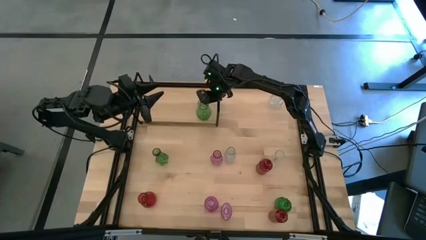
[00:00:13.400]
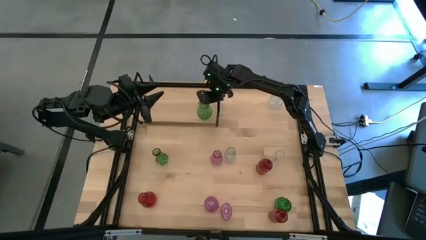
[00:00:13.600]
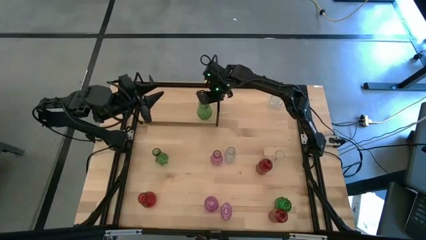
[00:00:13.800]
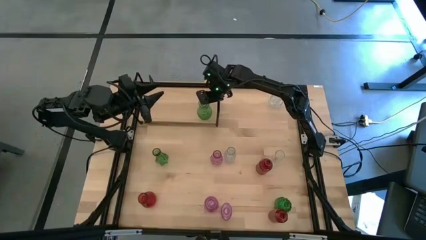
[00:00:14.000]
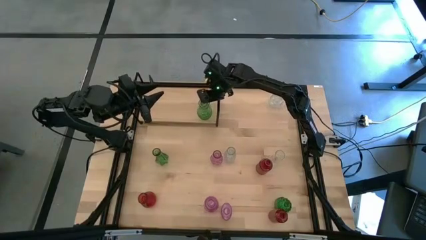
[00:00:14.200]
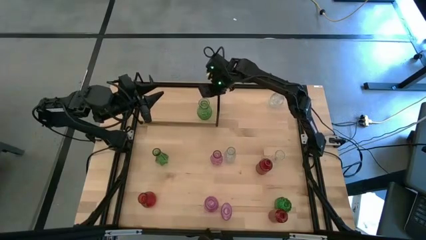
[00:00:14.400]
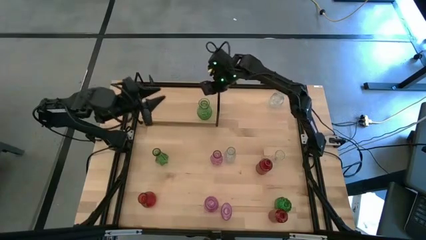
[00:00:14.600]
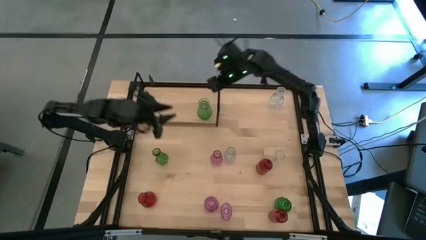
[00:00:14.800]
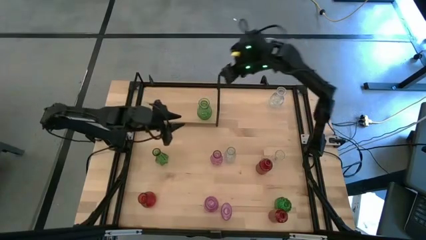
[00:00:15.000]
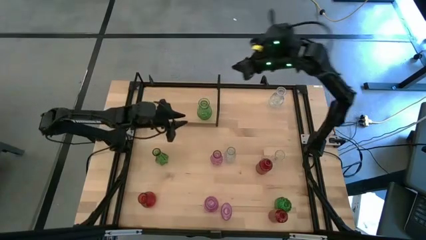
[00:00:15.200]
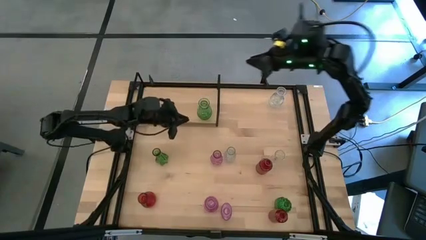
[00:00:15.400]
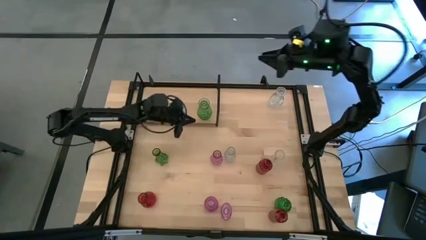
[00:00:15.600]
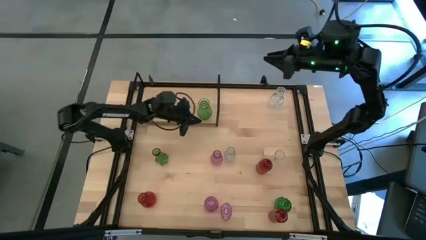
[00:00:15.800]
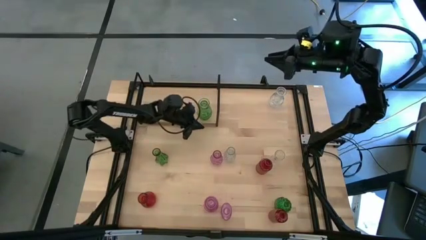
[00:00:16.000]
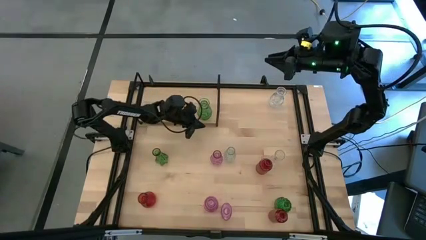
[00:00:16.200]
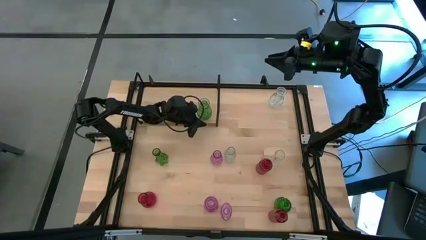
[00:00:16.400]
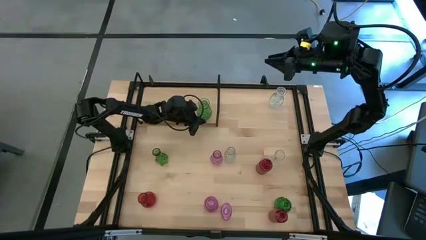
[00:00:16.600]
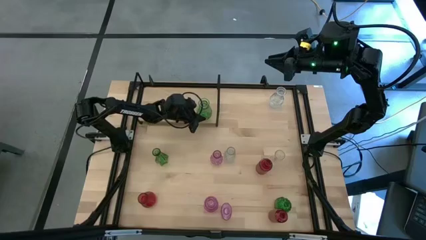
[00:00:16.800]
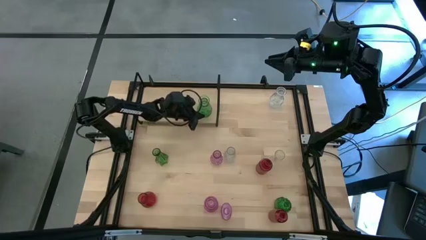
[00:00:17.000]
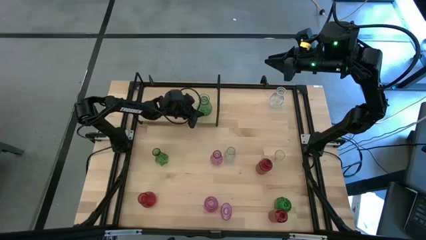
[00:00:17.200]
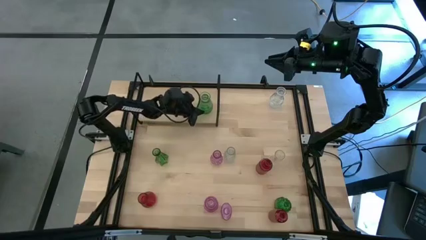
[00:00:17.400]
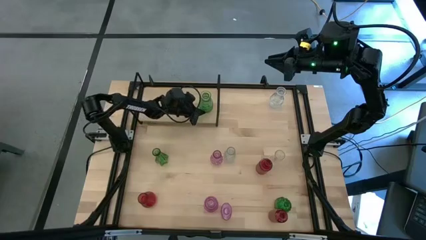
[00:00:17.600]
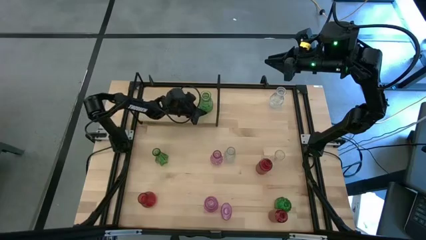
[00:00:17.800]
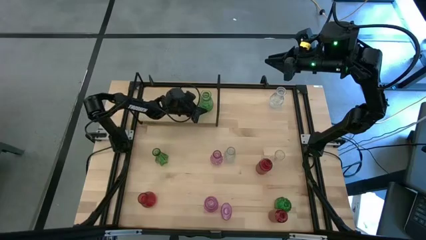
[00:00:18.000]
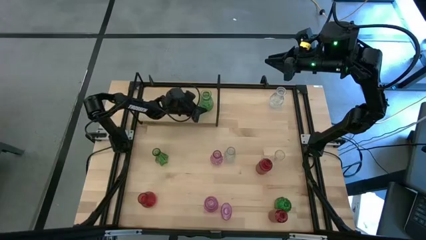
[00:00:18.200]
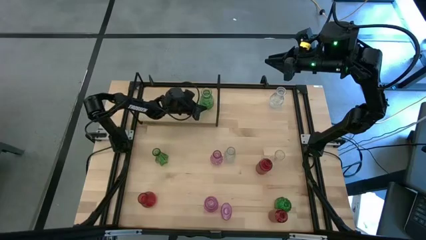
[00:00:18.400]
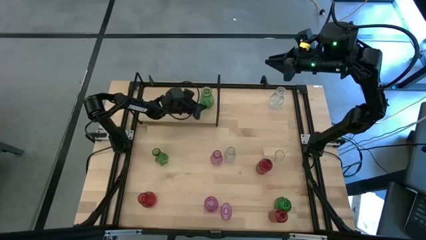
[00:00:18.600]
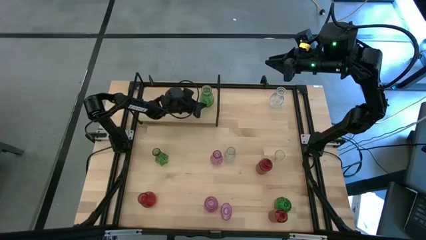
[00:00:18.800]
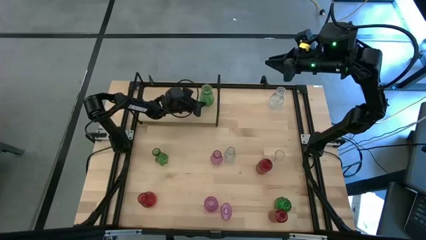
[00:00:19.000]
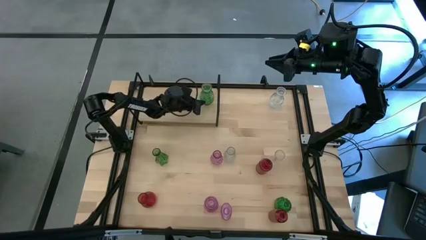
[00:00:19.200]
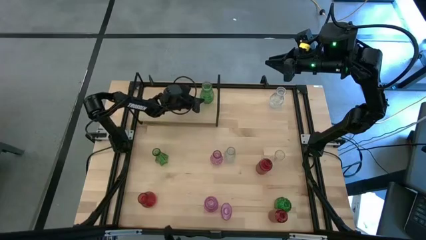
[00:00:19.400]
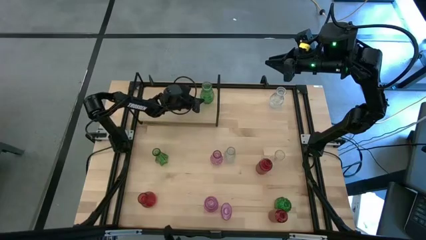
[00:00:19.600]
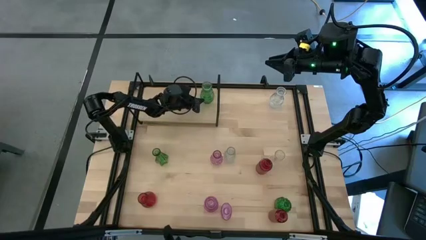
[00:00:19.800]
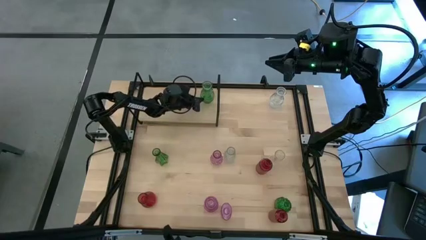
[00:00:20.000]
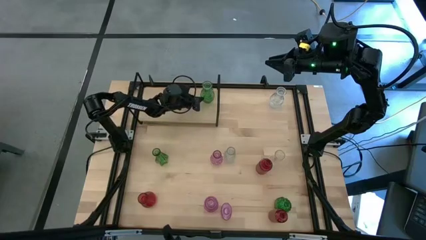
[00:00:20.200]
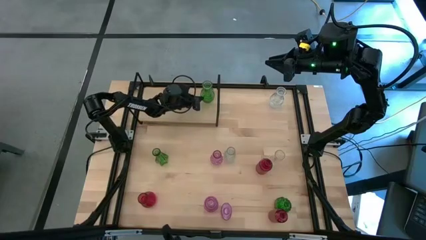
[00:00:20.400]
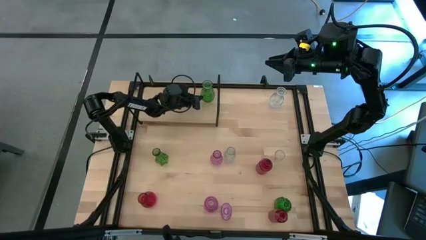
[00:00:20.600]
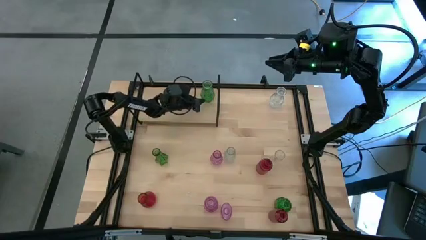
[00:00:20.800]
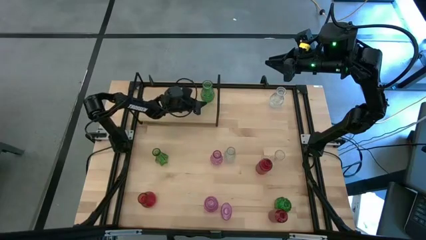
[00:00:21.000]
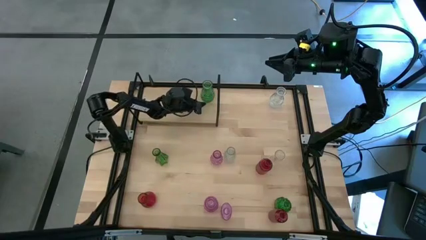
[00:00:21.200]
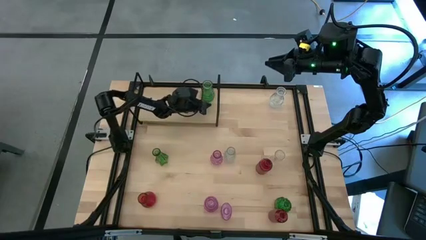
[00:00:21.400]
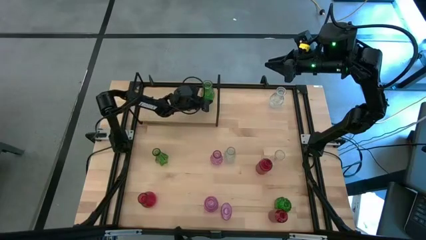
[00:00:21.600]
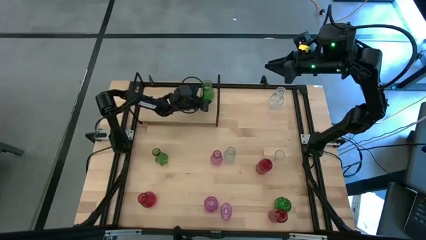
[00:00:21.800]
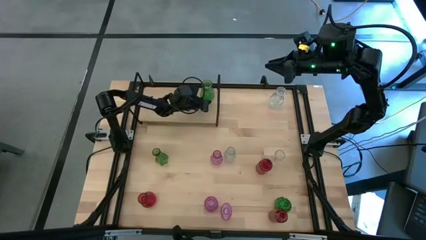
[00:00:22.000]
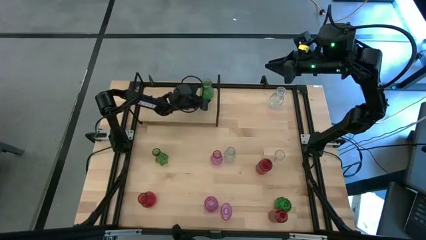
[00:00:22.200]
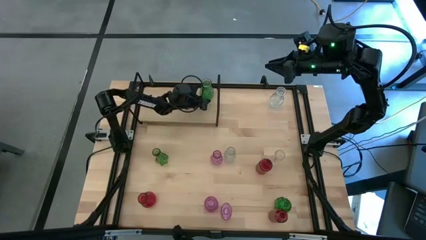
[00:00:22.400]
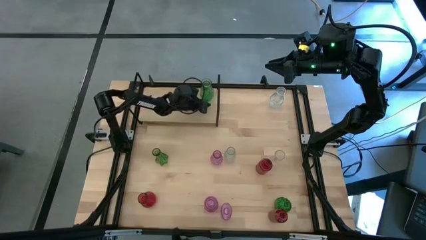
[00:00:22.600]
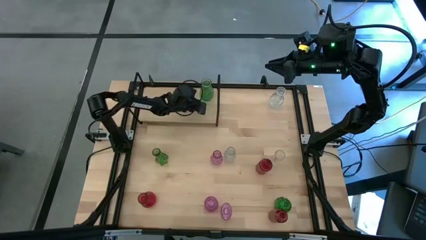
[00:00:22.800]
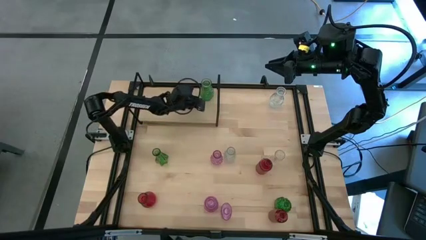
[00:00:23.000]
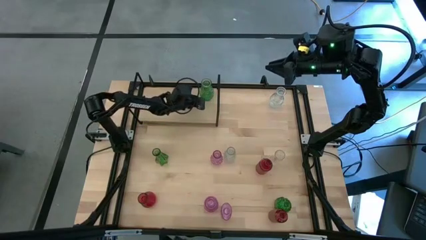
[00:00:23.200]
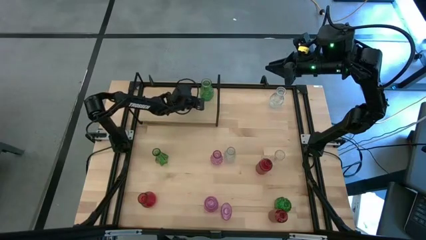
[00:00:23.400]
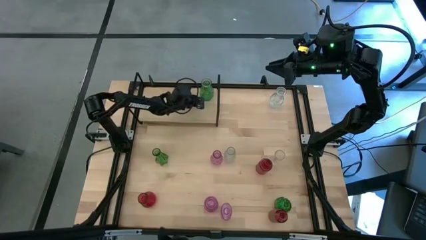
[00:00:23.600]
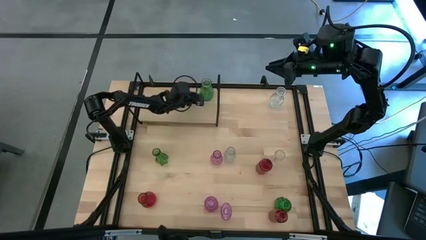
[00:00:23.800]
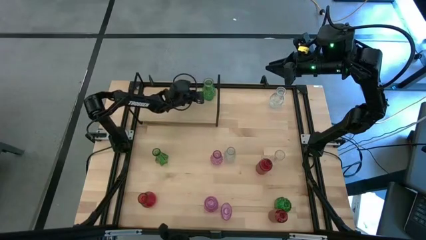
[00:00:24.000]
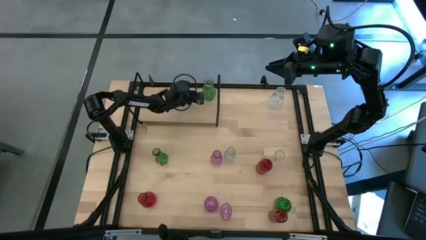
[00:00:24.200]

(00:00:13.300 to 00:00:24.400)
Task: sort vases onto shelf
Put the top green vase on the shelf

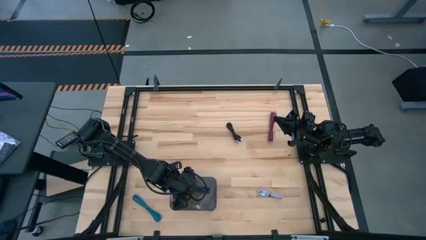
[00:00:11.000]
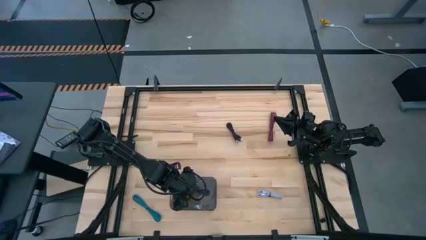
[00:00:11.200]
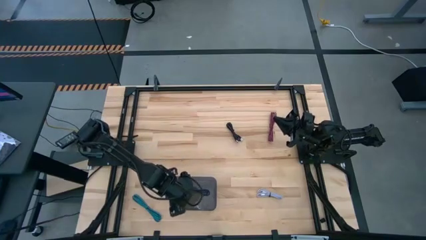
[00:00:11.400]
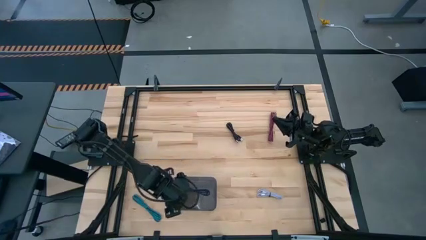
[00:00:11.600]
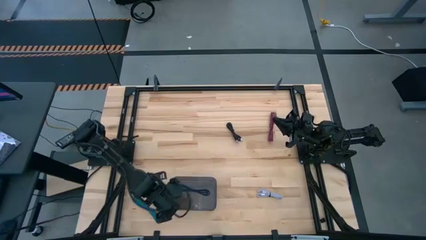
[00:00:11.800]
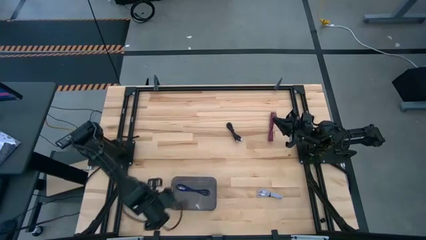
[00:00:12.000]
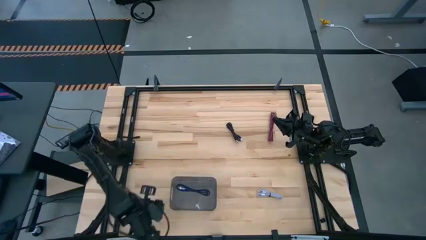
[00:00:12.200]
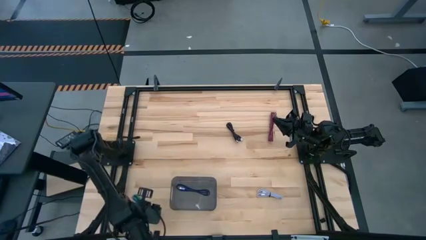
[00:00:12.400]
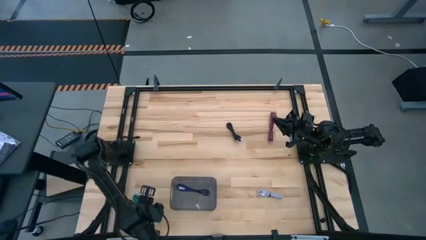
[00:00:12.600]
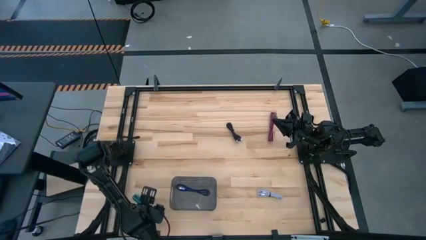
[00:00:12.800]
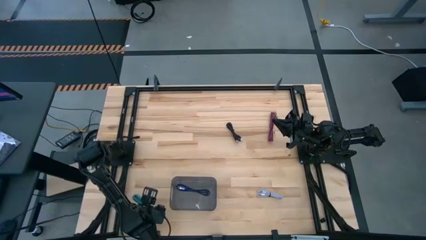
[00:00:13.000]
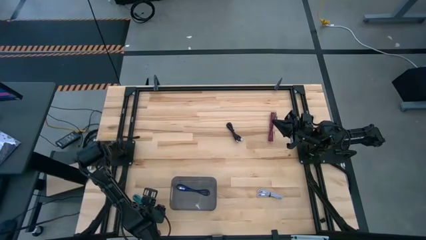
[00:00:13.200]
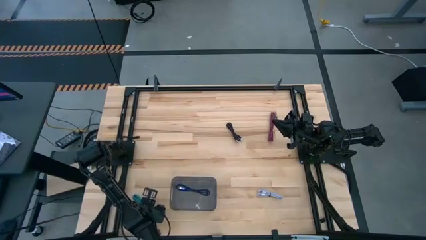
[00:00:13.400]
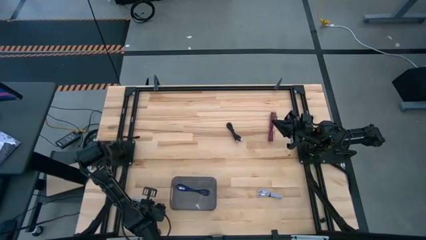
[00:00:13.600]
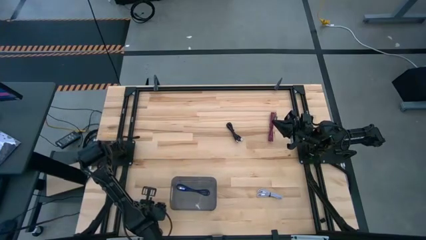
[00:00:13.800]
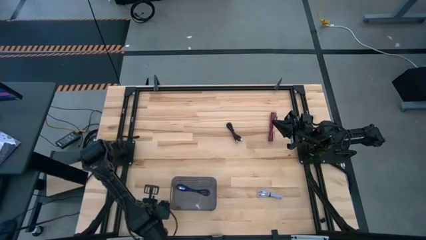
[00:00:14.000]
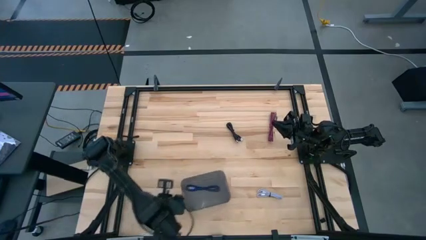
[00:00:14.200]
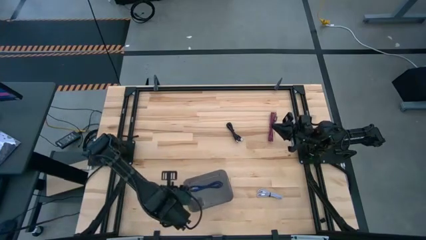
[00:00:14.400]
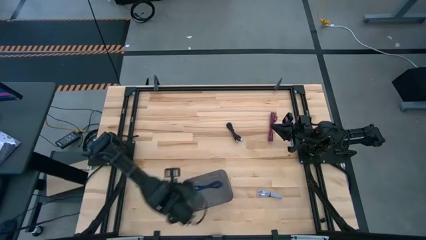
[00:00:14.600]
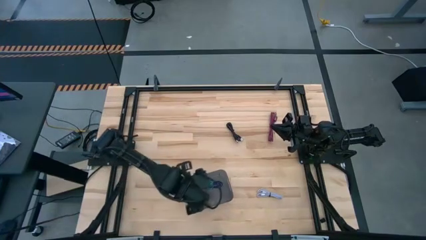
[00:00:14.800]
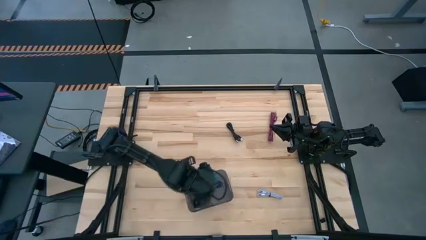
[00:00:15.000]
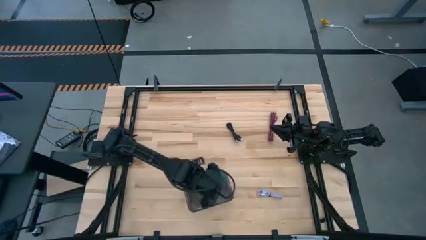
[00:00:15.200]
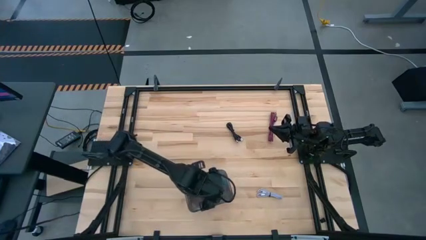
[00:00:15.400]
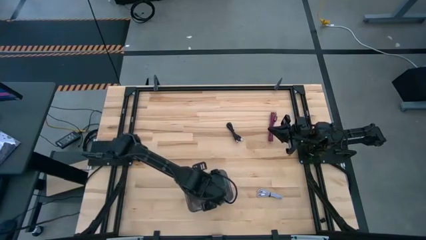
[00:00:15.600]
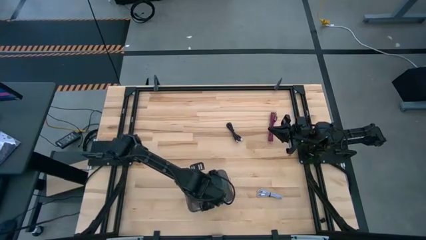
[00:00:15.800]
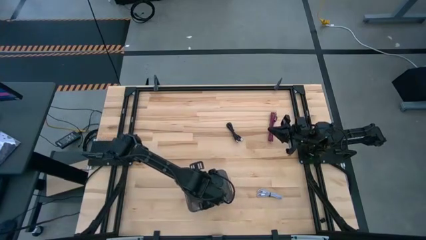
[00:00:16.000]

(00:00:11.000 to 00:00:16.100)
Task: Pick and place USB-C Cables
Put the blue charger cable into the black bin
